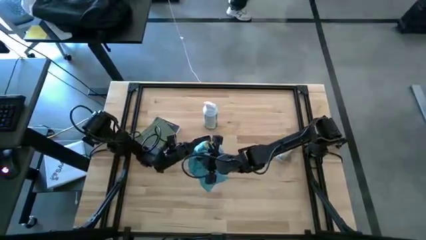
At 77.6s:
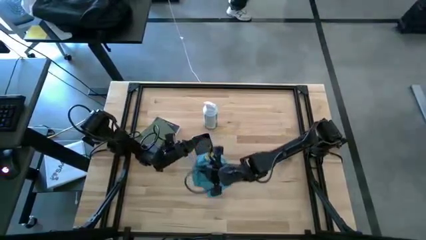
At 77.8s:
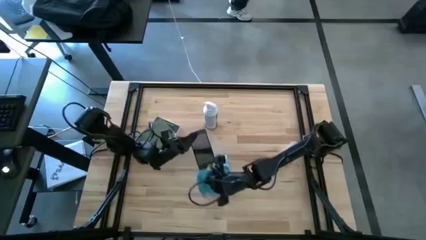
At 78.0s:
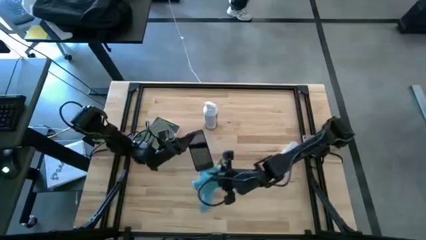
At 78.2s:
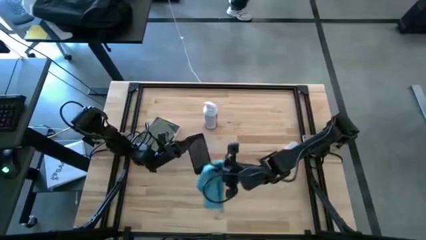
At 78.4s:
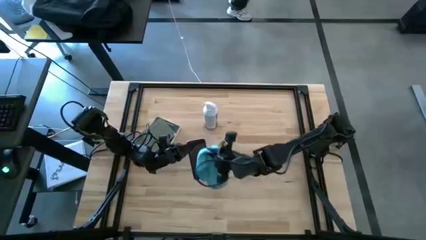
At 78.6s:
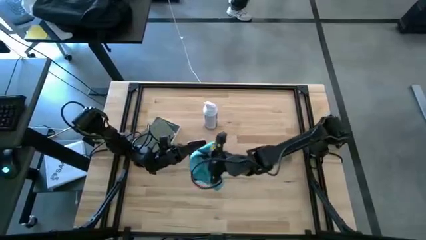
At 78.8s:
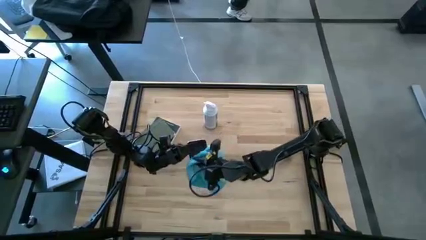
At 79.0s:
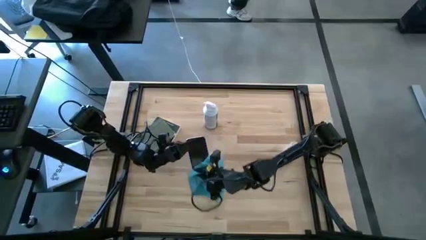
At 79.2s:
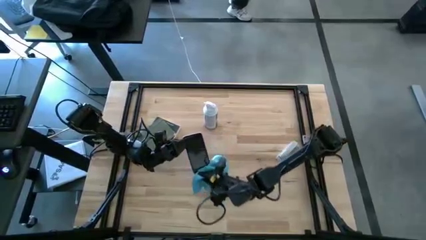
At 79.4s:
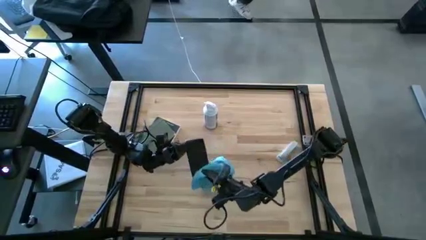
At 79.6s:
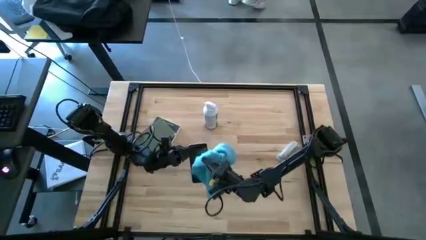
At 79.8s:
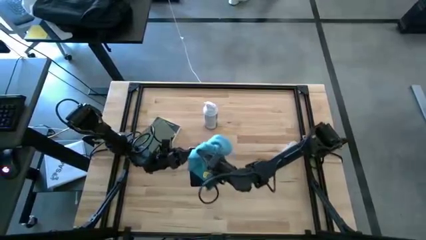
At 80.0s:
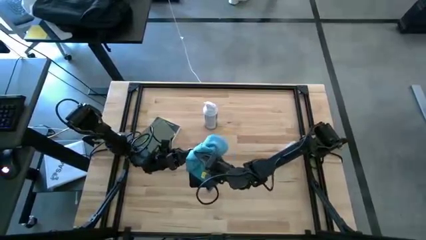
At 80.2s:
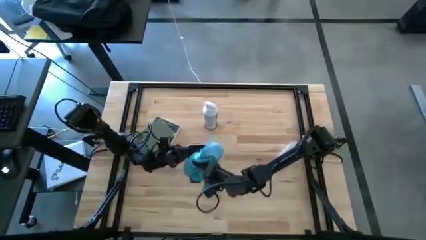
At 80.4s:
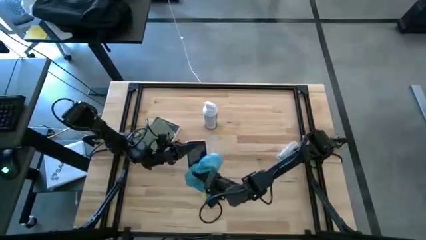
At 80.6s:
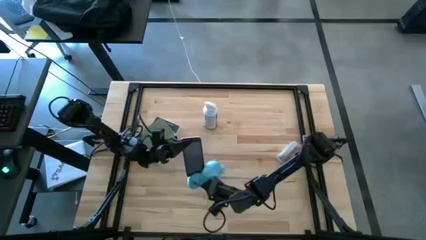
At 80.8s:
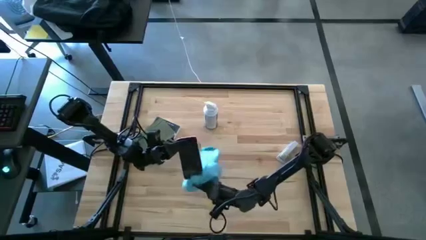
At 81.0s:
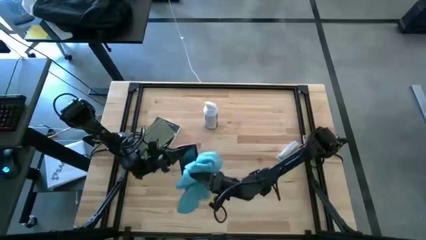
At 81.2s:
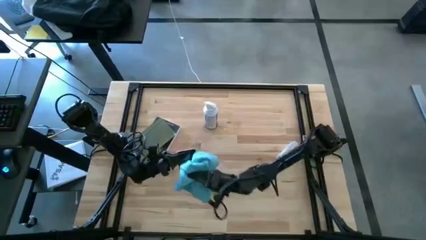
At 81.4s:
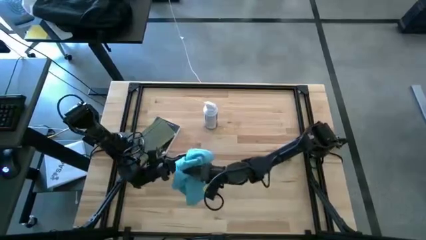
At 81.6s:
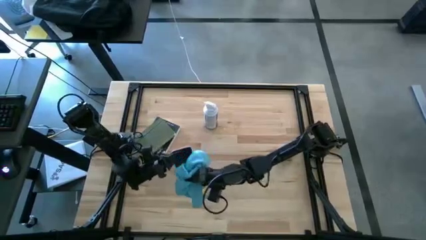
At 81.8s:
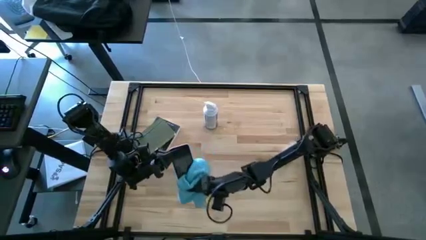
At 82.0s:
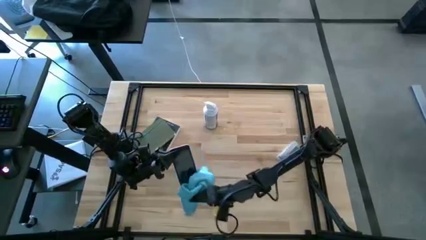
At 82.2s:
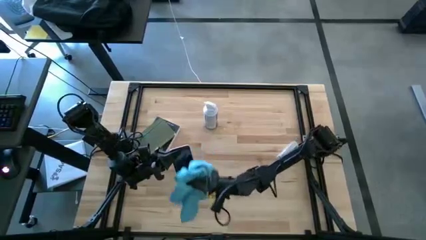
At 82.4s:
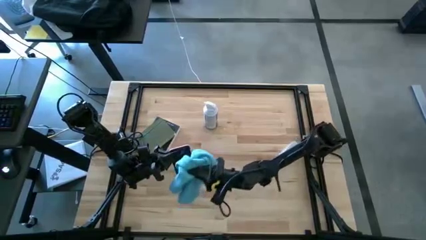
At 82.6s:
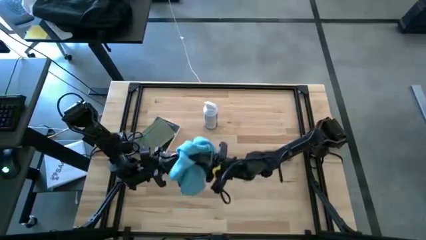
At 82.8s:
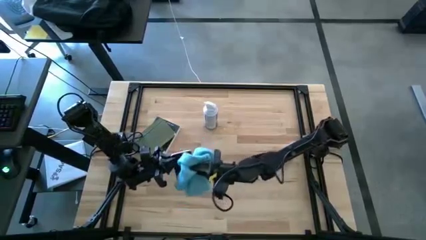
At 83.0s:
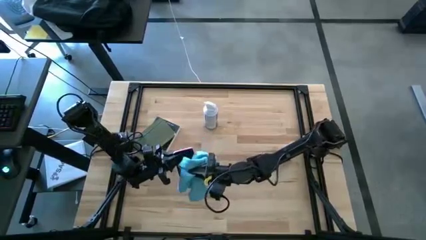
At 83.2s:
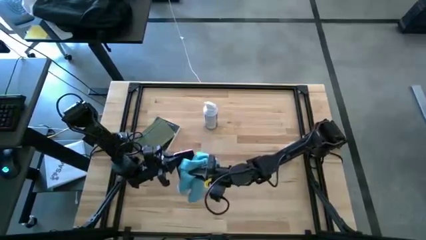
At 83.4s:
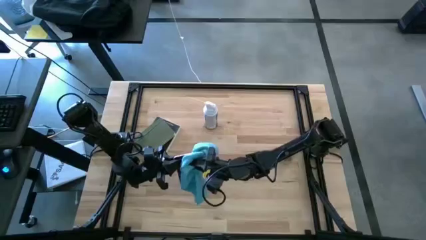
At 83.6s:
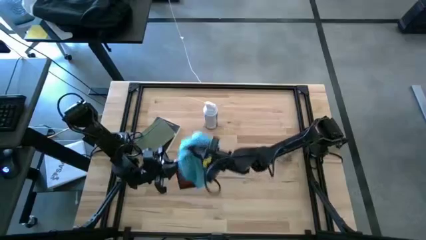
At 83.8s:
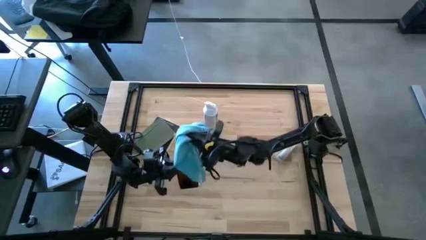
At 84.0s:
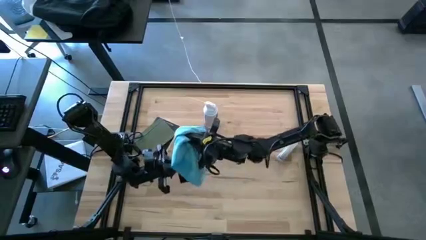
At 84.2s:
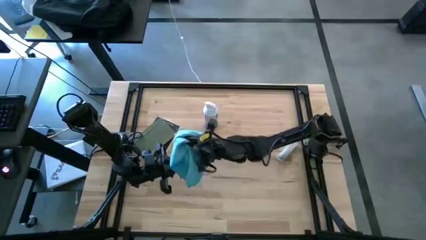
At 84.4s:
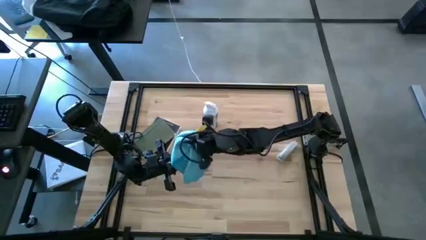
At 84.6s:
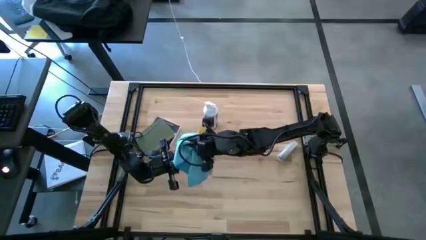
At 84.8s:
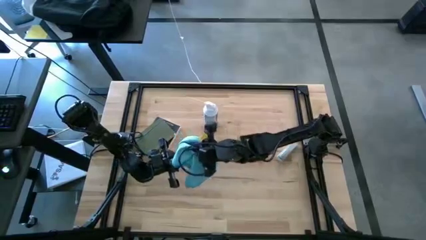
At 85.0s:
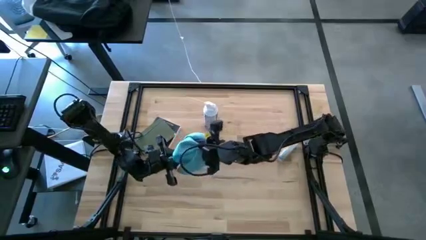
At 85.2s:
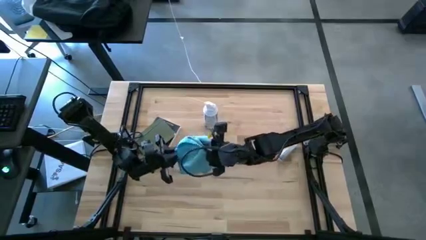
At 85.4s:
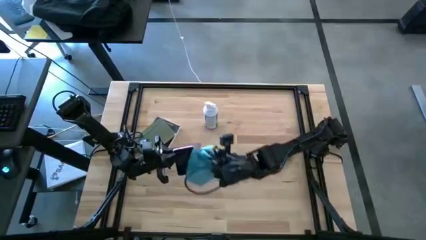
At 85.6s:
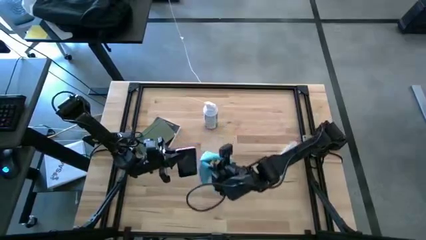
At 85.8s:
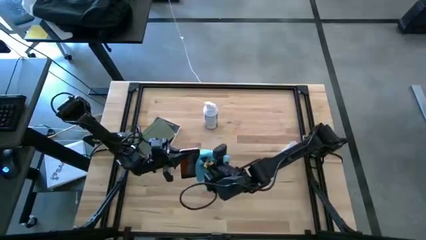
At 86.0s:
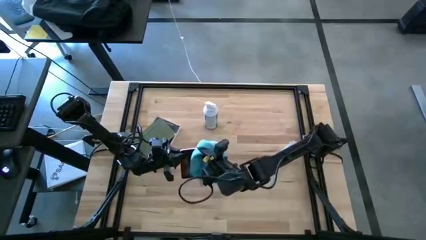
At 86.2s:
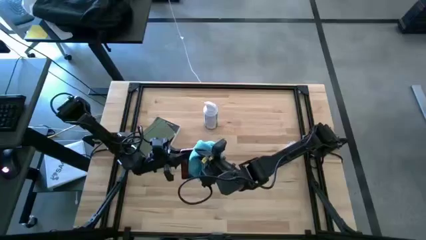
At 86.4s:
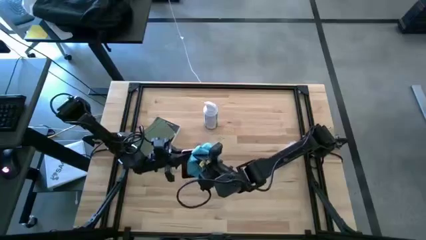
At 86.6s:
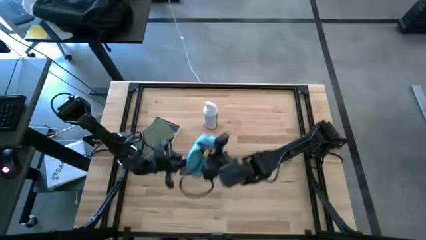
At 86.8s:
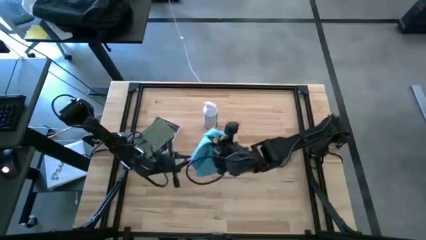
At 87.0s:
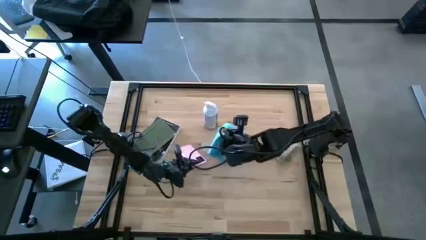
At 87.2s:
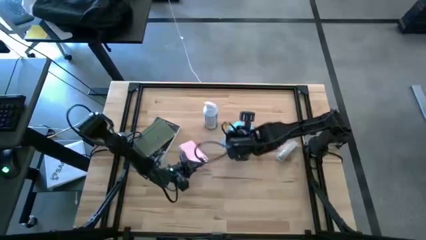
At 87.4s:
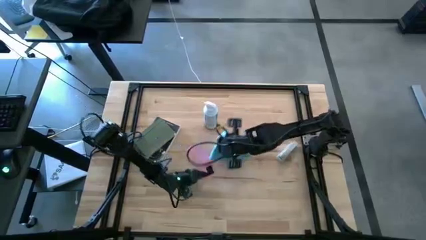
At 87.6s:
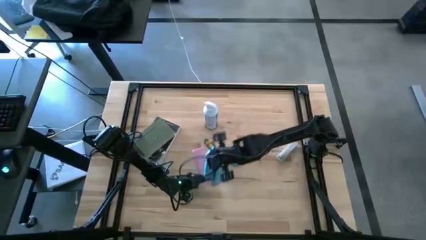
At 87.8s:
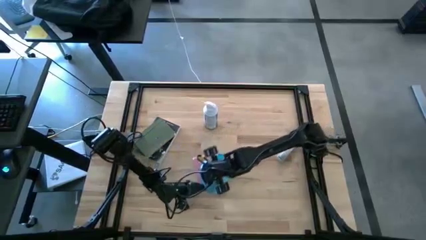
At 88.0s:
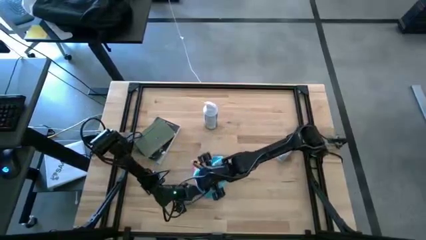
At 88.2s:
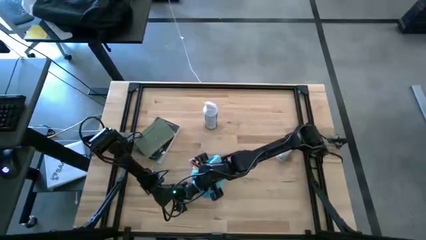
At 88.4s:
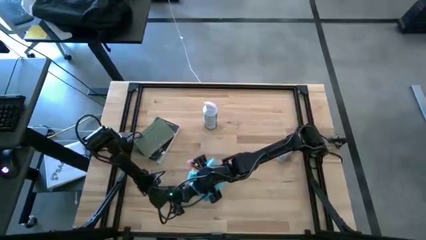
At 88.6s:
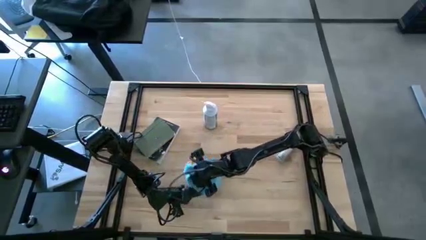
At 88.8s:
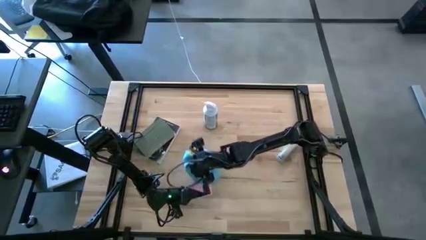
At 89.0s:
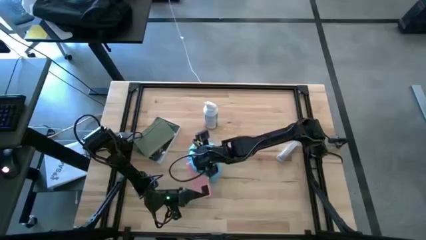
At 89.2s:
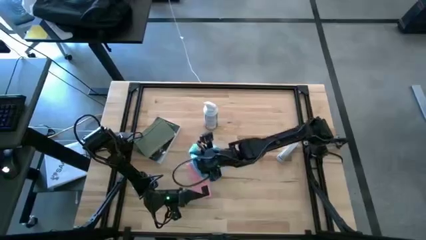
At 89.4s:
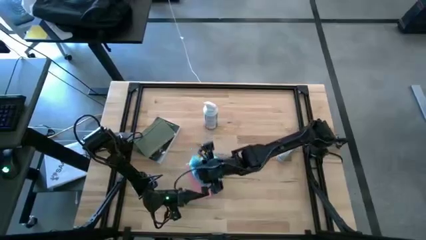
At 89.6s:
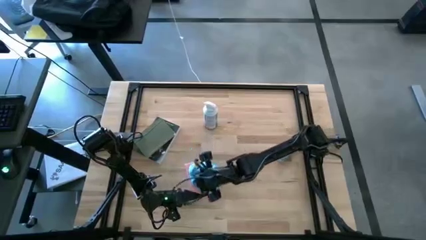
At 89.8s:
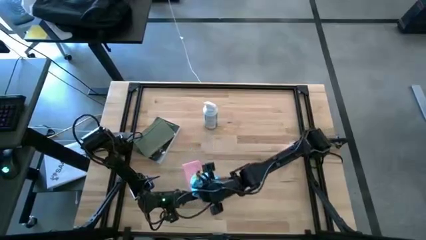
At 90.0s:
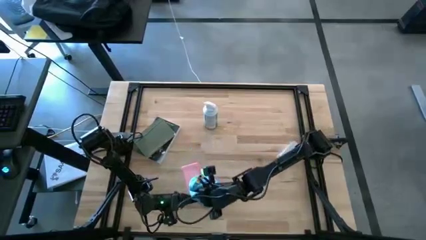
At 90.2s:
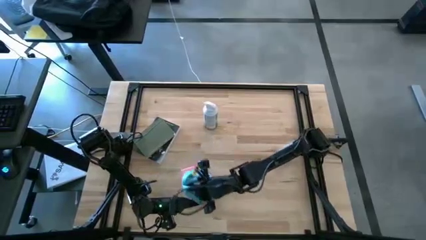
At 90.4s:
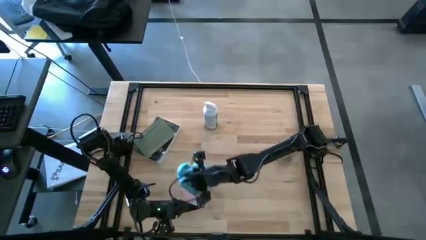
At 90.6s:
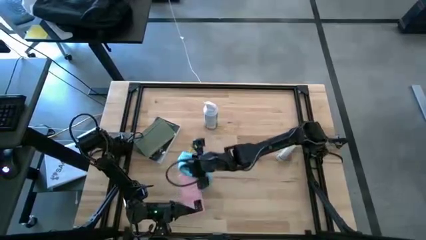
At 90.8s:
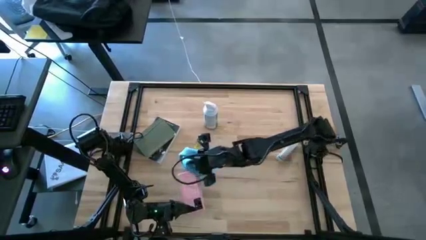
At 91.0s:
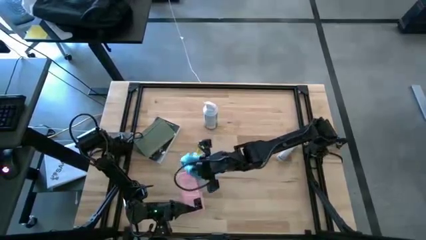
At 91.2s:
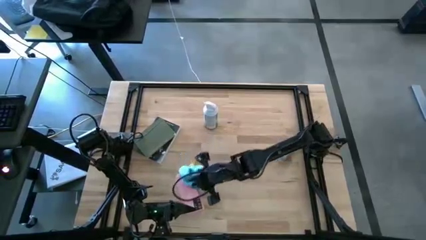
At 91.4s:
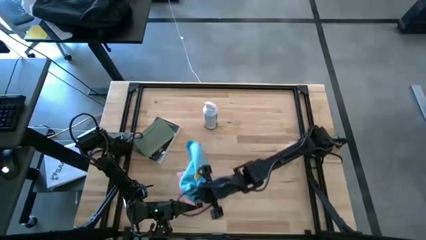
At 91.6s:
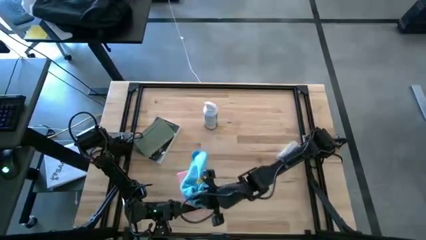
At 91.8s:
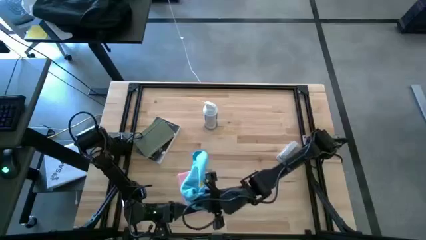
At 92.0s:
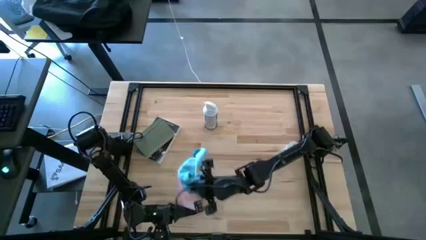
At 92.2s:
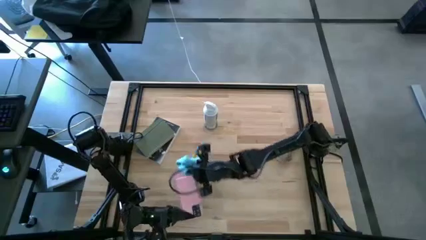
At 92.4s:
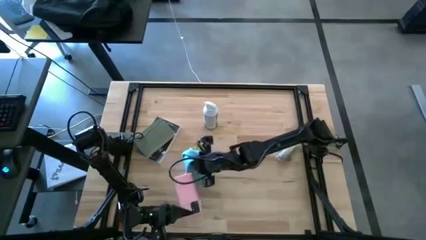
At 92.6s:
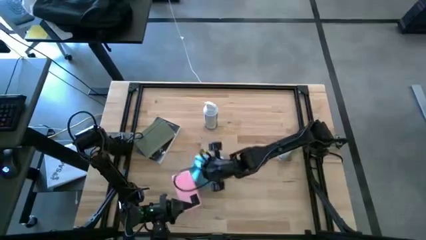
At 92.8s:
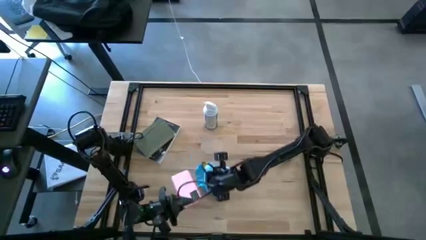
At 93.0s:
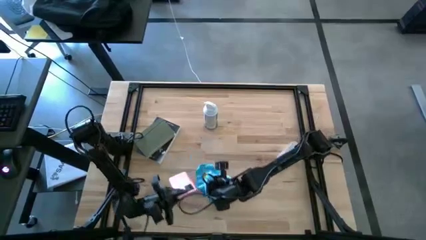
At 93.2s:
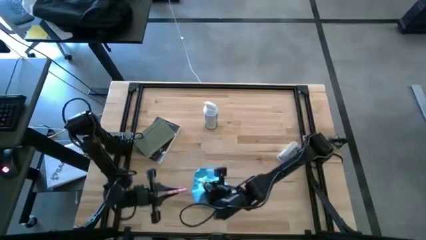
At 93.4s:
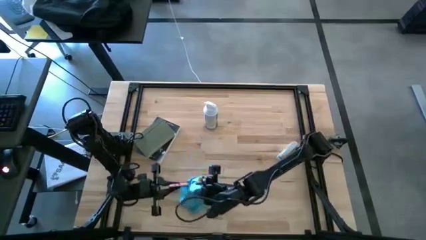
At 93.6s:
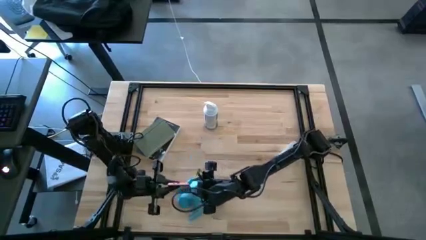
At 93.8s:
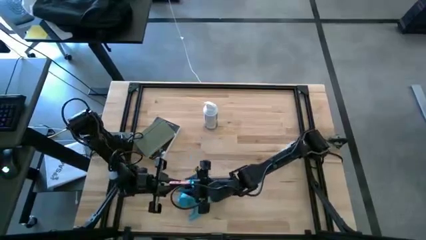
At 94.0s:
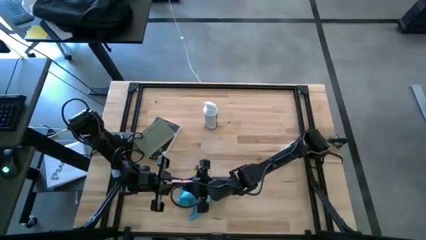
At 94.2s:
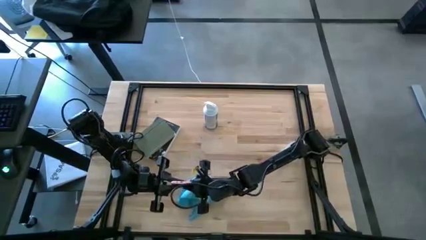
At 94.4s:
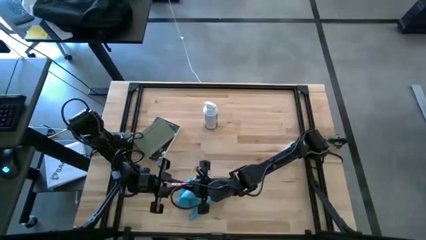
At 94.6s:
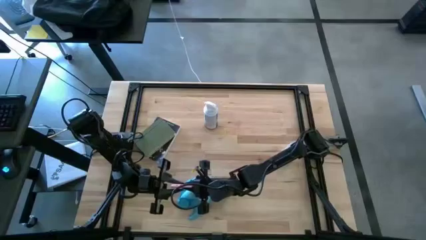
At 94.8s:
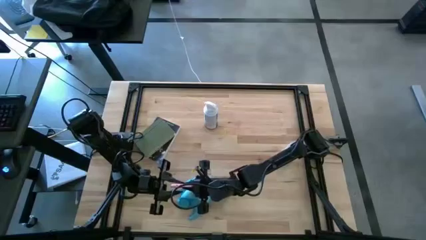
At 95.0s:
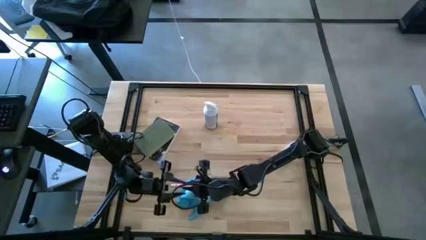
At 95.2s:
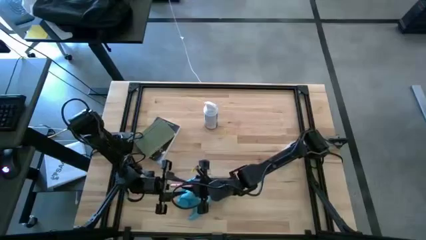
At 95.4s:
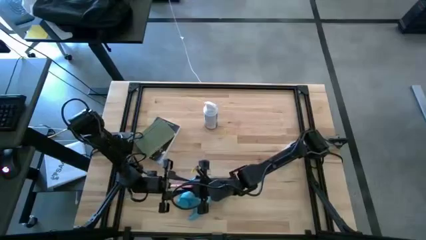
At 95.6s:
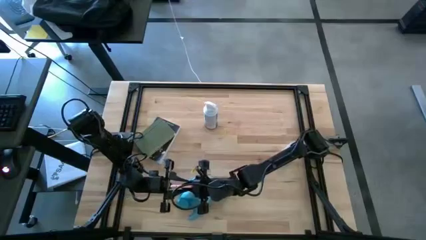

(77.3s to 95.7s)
Task: Apply microfiber cloth
Wipe the cellphone with the microfiber towel
